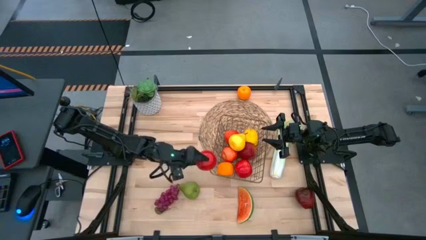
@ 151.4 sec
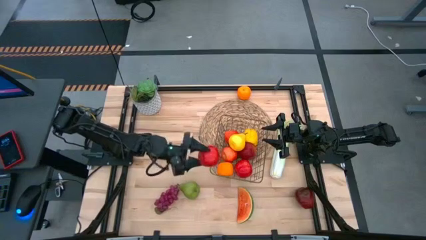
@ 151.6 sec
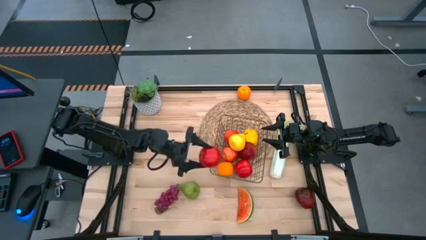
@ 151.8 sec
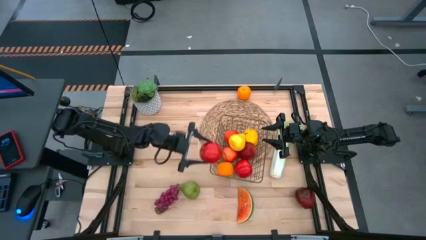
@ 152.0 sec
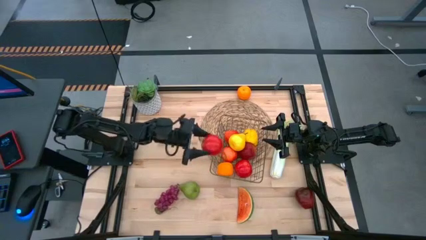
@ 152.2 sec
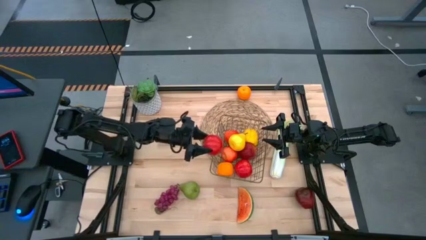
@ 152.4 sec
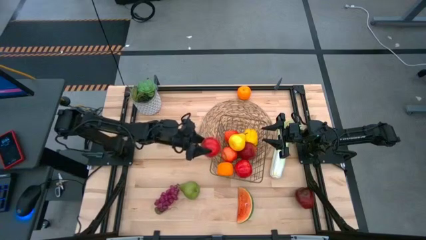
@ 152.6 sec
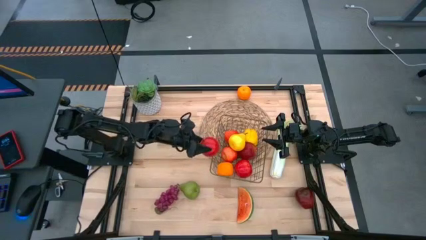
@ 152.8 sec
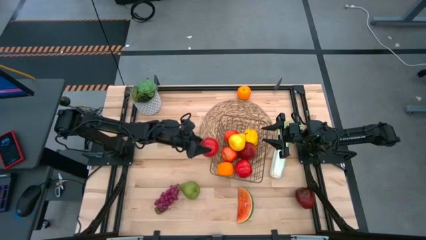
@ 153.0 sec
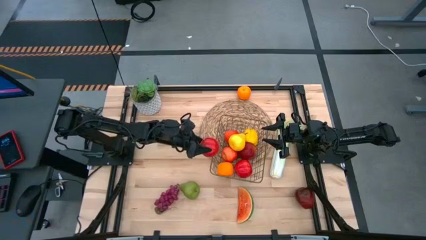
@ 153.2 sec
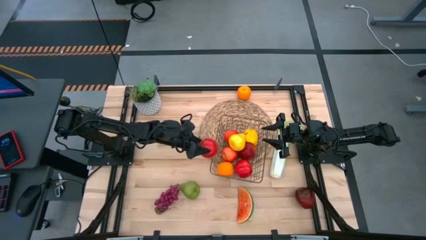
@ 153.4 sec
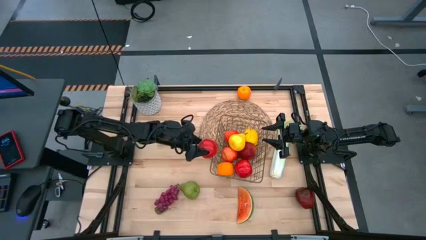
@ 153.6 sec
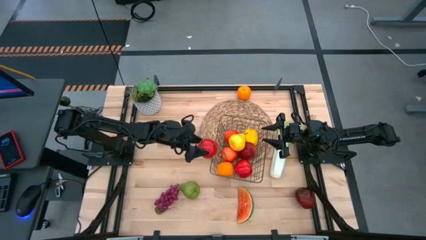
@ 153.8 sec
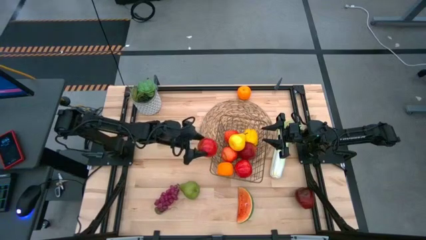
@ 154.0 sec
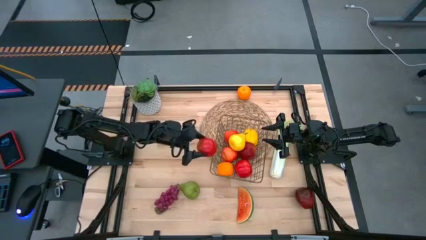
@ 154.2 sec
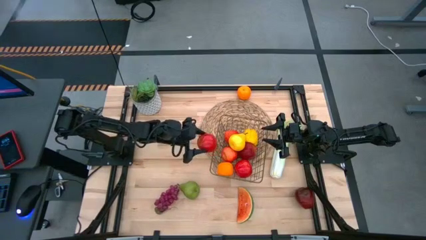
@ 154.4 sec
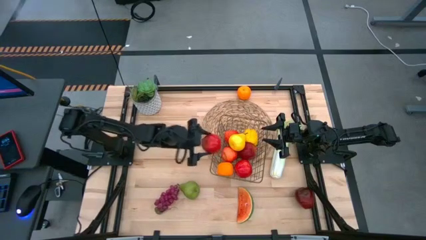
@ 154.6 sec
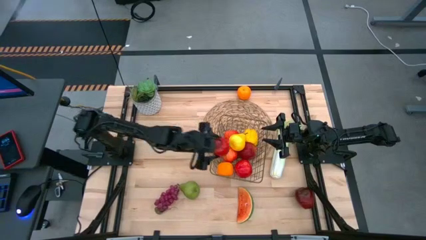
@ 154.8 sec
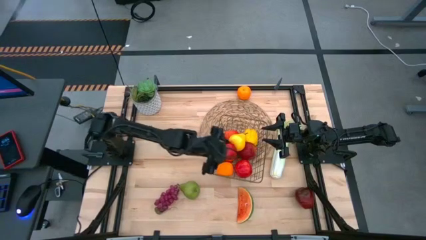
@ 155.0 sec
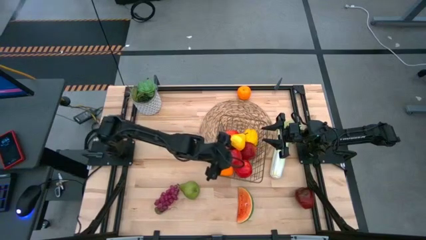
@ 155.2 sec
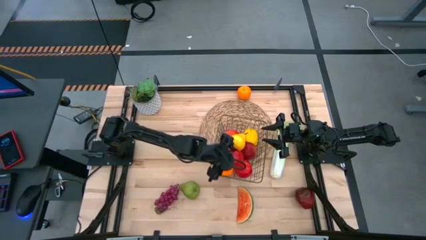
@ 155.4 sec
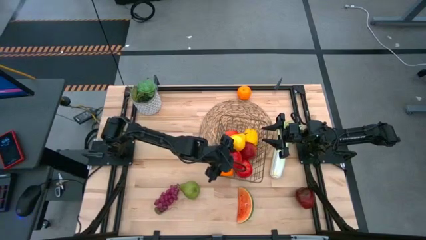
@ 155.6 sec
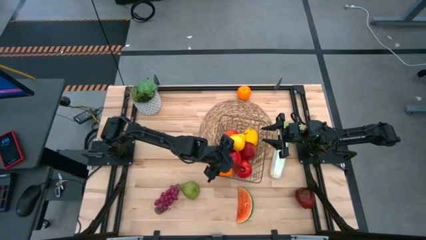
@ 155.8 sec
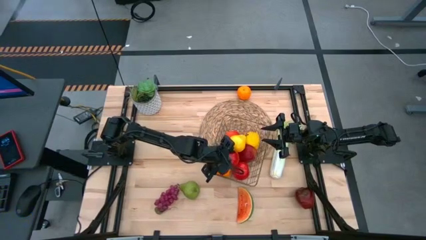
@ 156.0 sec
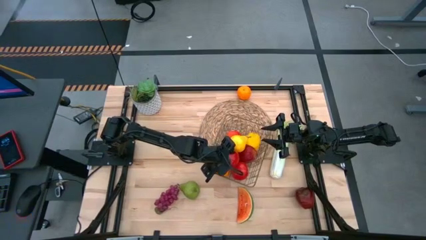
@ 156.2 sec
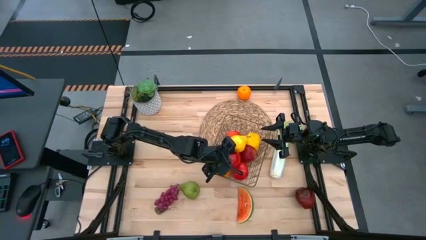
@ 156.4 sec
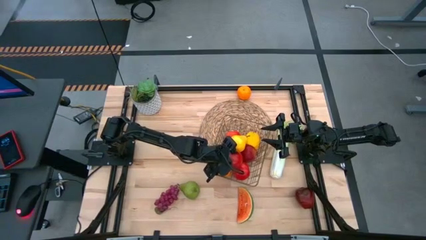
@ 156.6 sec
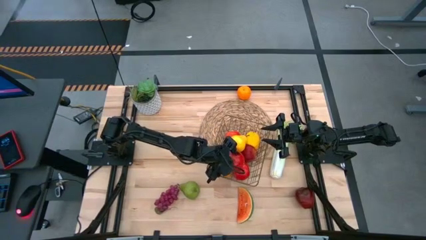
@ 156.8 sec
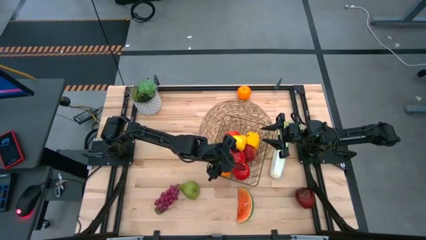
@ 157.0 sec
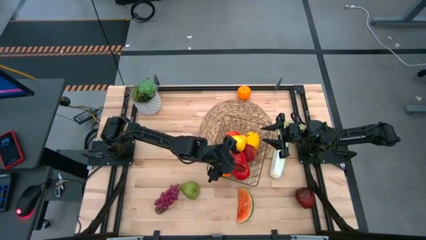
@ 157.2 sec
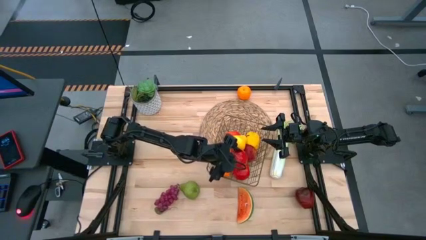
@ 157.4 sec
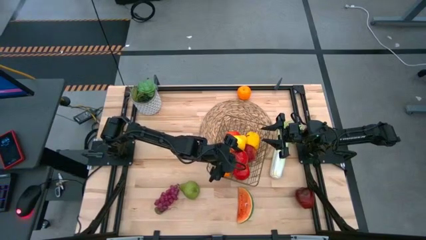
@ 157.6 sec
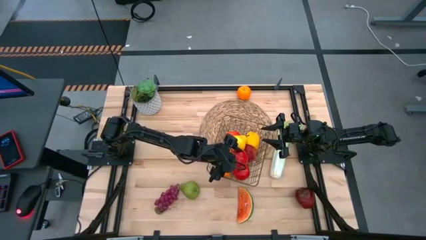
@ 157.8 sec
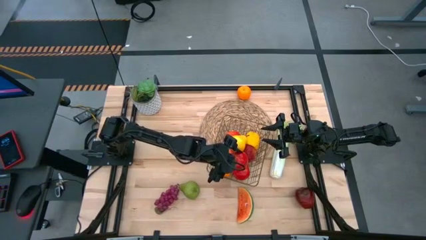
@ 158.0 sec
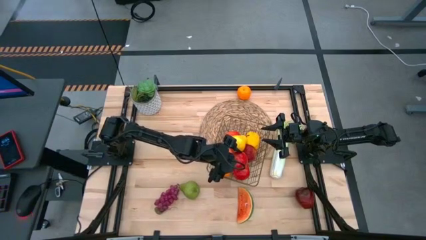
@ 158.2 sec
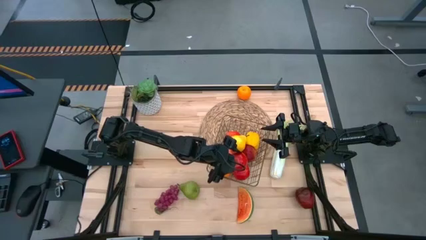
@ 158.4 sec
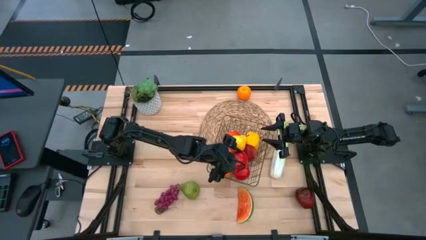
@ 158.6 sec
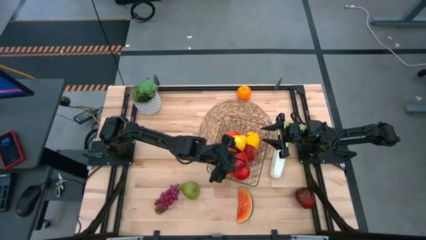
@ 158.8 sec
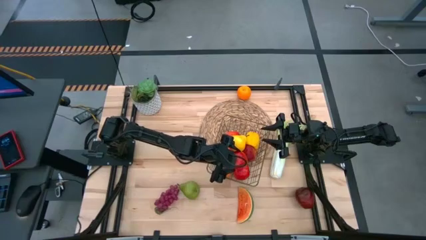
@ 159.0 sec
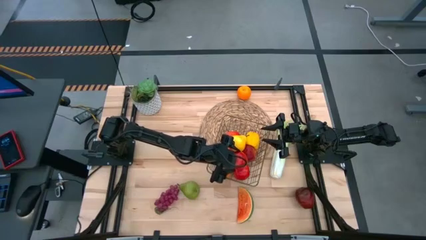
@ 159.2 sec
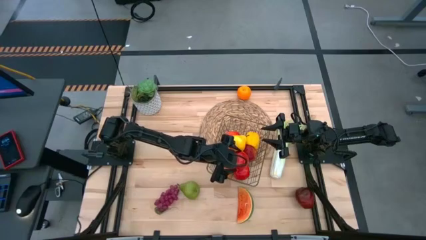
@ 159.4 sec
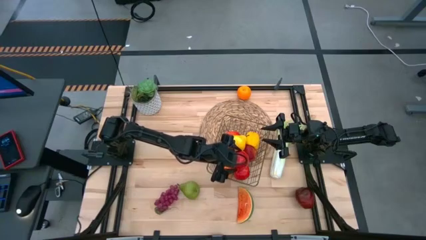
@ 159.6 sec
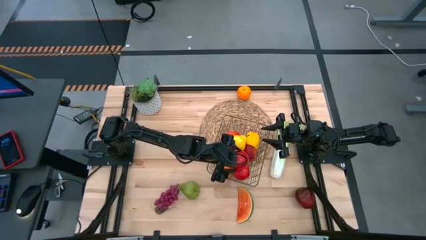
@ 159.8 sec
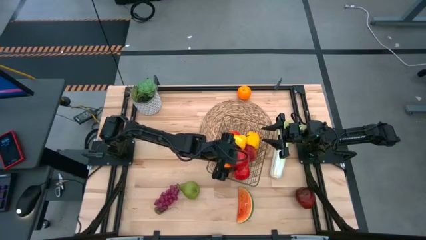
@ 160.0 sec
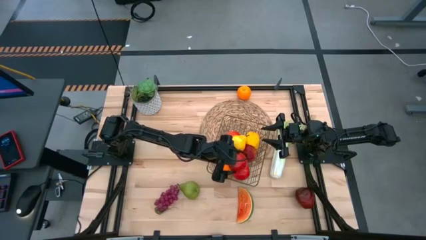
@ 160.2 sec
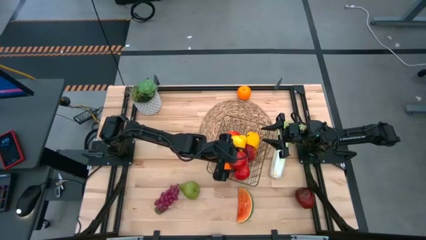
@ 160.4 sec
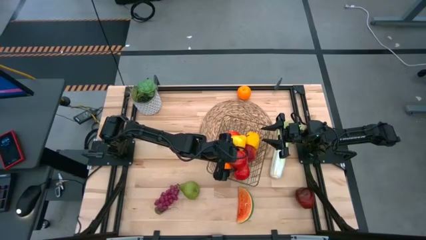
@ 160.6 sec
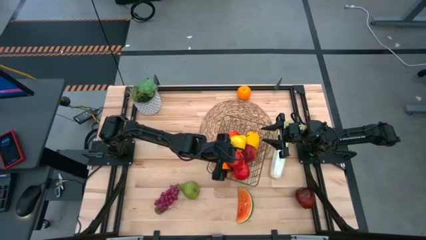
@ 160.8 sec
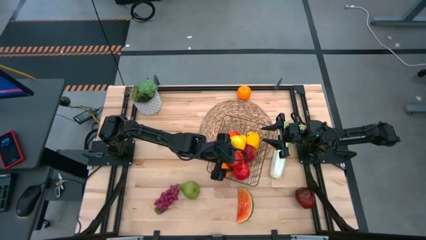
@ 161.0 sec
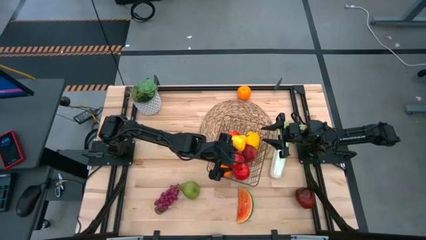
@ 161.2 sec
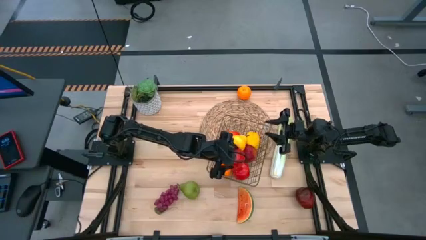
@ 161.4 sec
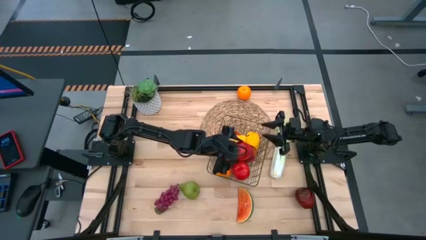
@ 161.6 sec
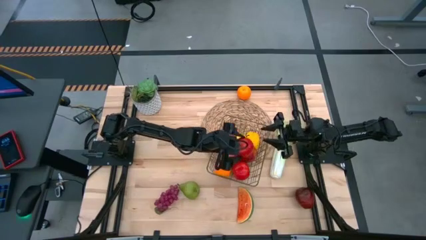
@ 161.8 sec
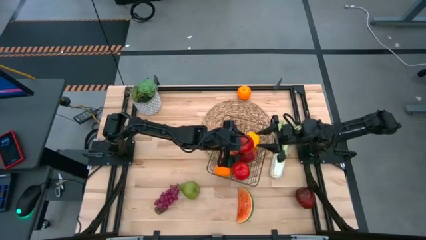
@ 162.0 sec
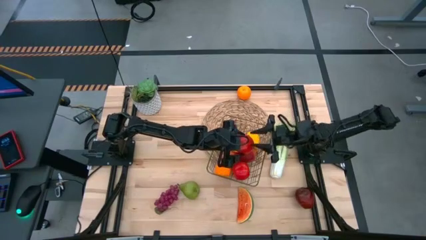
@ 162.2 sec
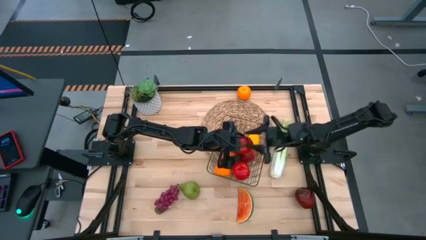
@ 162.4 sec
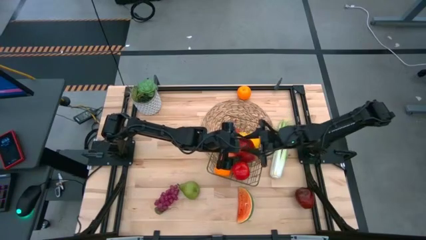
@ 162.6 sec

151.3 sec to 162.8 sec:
Task: Build produce basket
Put the red apple into the wire basket

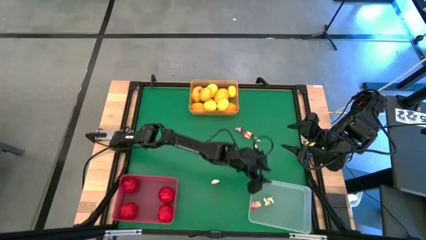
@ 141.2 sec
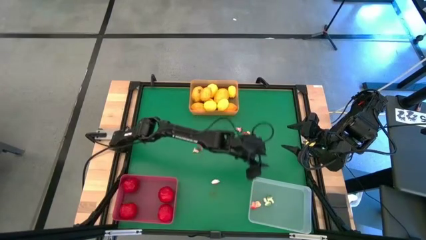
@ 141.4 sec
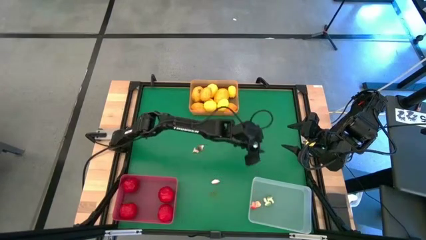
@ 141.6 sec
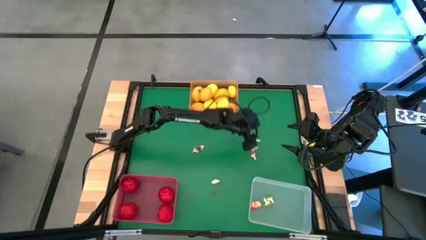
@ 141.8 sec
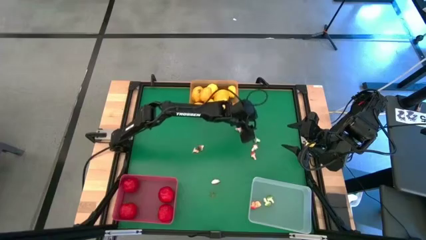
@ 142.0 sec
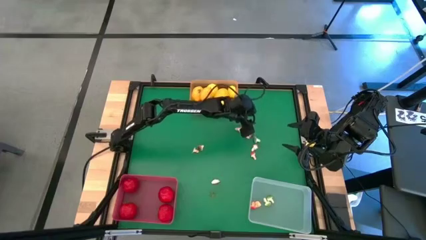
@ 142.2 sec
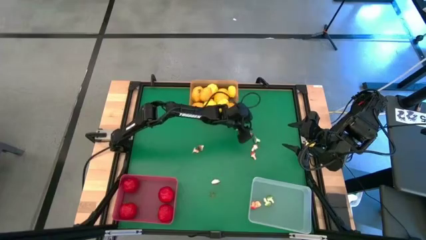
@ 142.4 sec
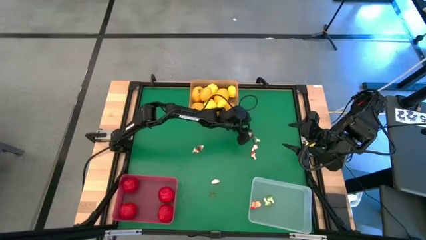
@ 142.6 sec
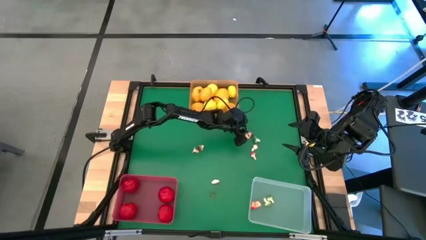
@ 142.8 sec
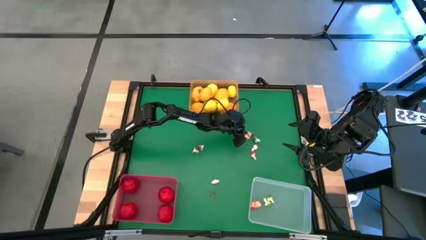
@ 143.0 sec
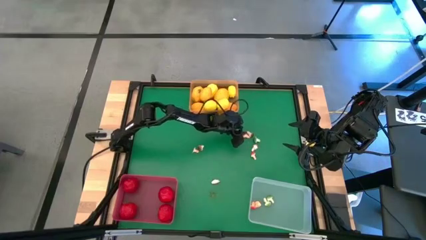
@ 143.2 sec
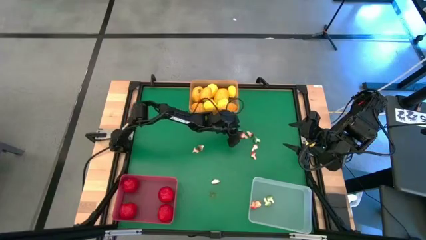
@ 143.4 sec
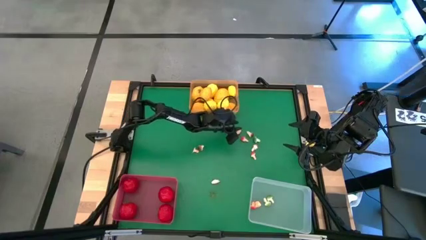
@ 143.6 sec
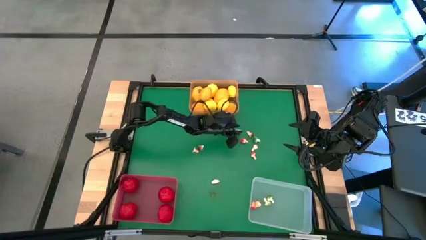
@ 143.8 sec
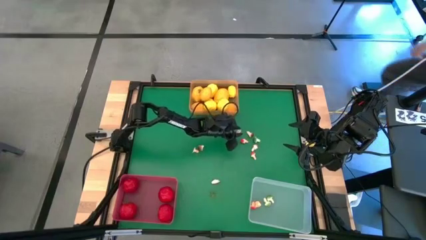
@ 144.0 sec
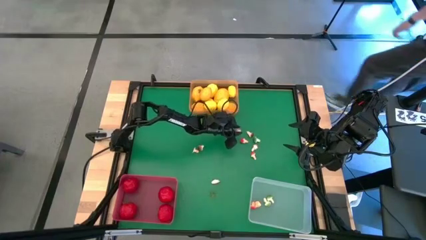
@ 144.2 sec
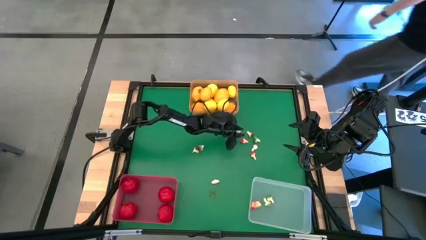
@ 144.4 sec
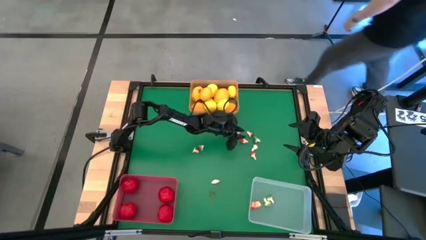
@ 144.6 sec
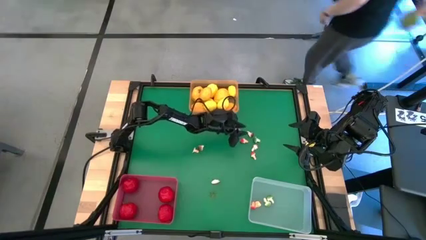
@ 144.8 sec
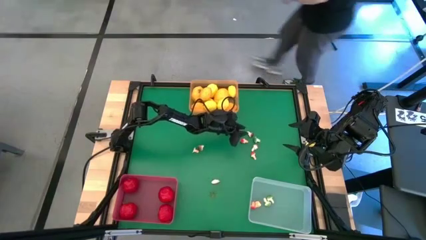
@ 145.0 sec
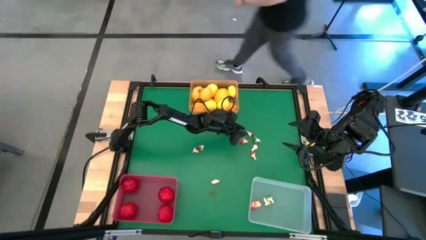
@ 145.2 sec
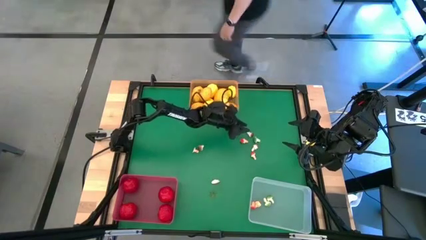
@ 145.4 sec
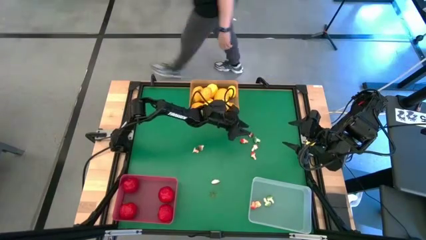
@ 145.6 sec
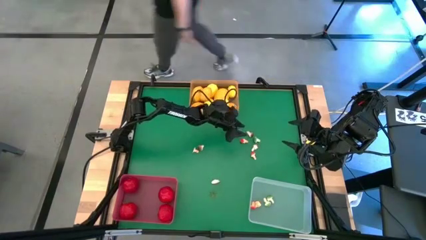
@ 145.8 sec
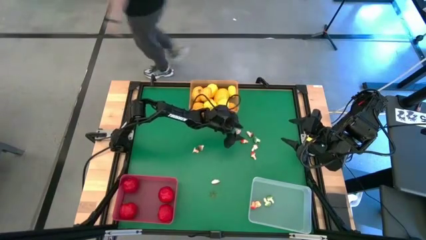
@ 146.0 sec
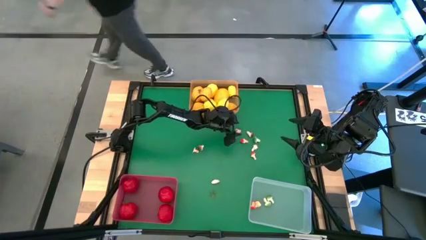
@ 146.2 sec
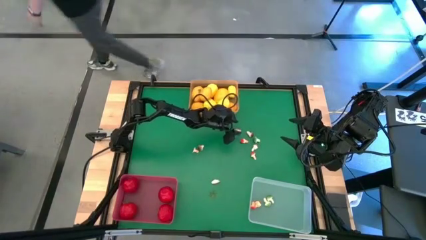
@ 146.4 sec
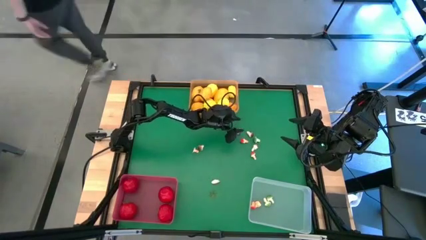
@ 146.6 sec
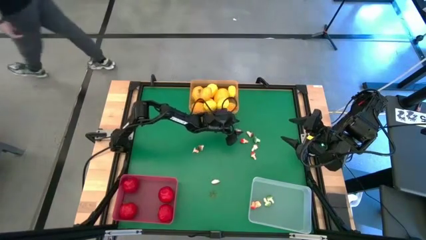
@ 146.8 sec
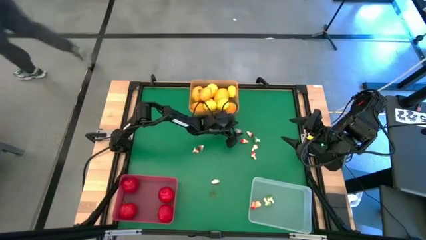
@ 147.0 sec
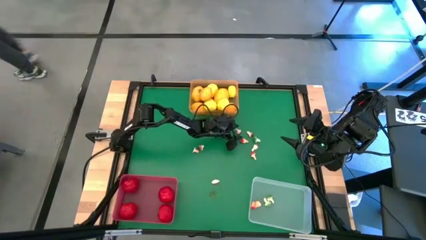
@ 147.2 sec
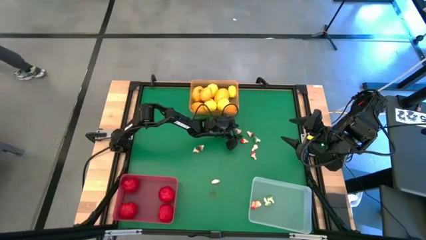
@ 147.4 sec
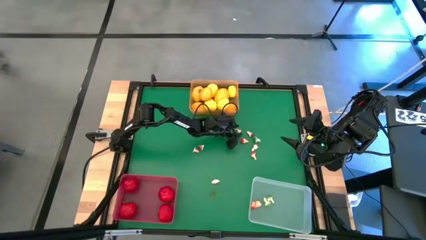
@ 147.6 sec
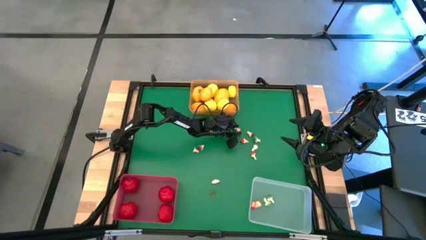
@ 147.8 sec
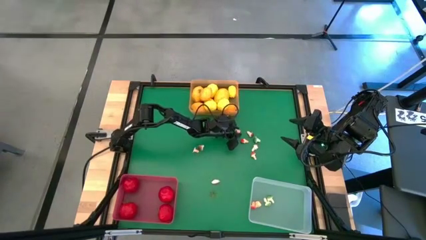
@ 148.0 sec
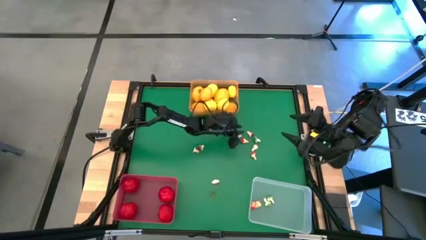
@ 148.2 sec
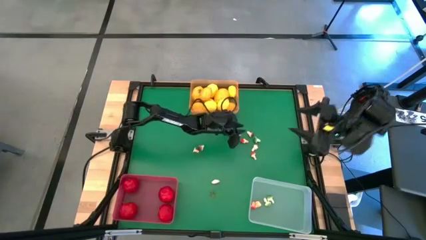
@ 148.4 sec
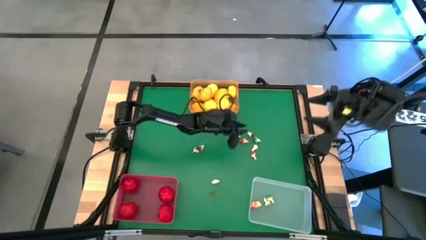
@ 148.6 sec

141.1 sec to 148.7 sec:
Task: Sort produce into baskets
Put the brown mushroom into the transparent bin
